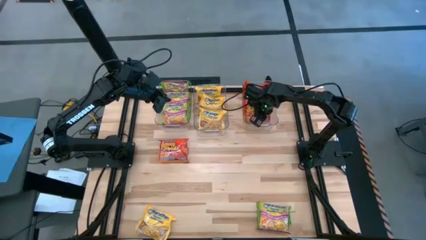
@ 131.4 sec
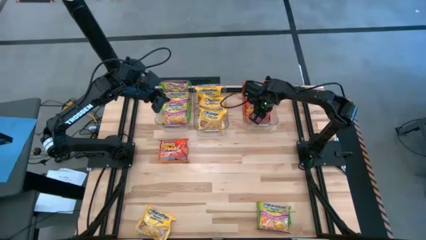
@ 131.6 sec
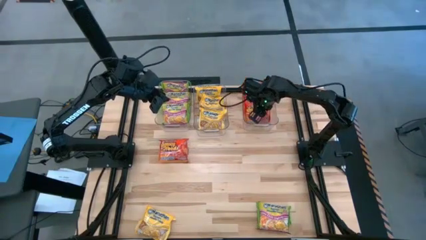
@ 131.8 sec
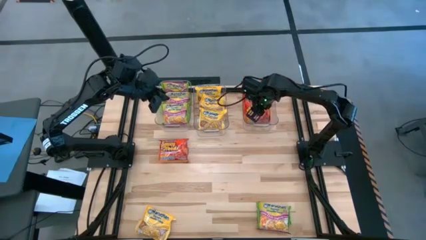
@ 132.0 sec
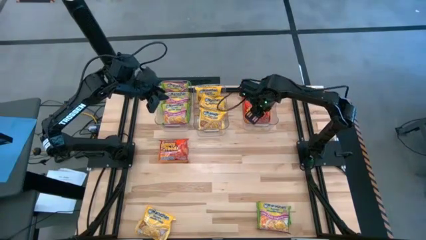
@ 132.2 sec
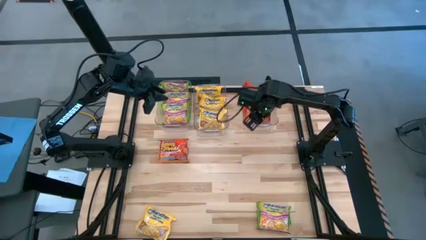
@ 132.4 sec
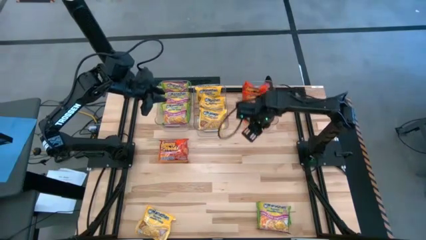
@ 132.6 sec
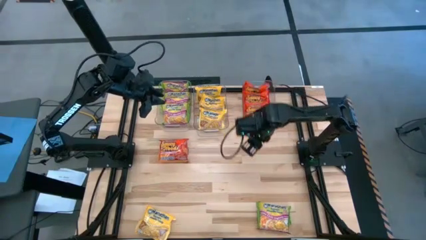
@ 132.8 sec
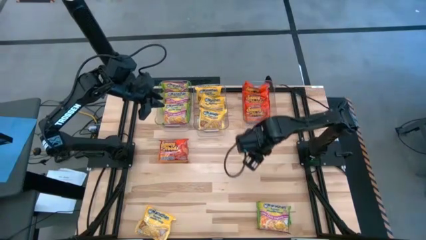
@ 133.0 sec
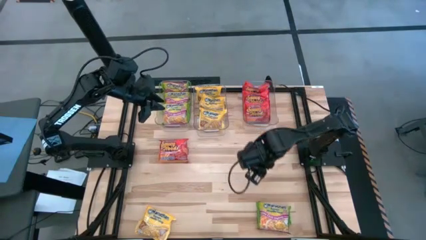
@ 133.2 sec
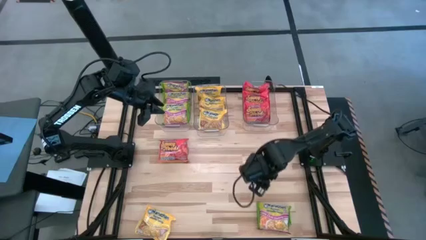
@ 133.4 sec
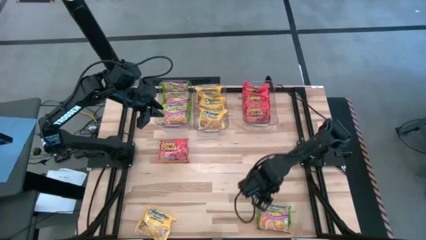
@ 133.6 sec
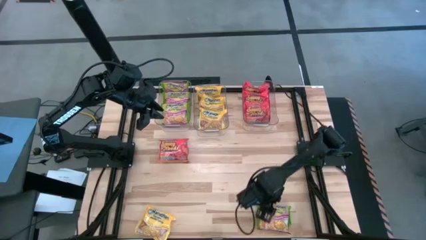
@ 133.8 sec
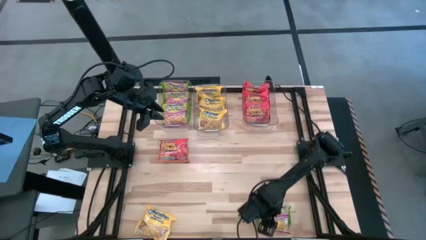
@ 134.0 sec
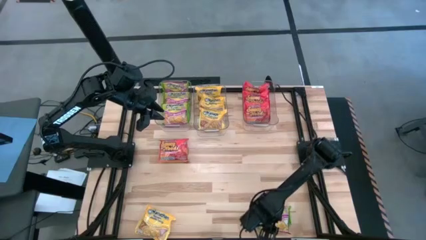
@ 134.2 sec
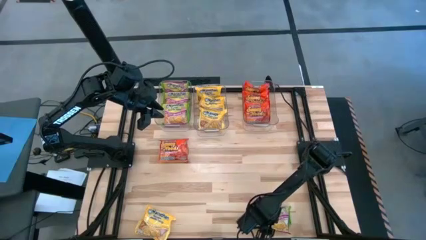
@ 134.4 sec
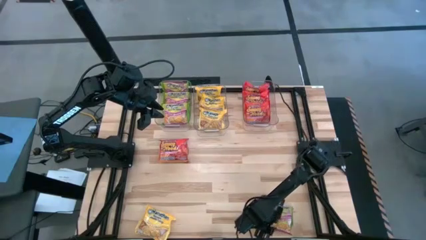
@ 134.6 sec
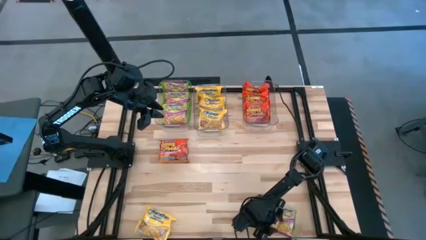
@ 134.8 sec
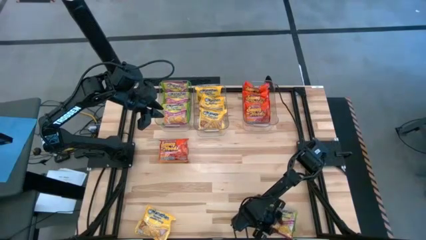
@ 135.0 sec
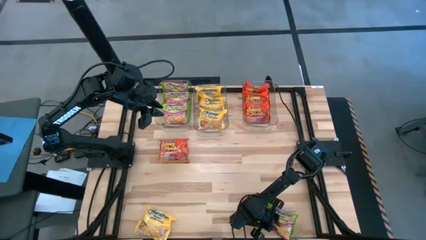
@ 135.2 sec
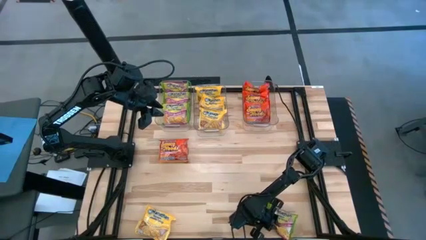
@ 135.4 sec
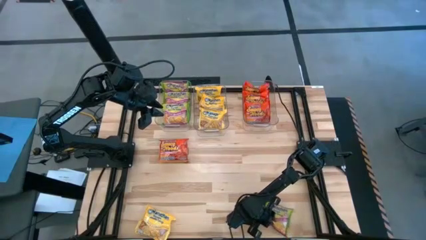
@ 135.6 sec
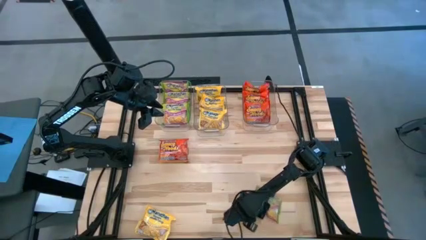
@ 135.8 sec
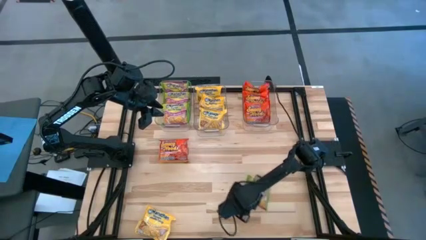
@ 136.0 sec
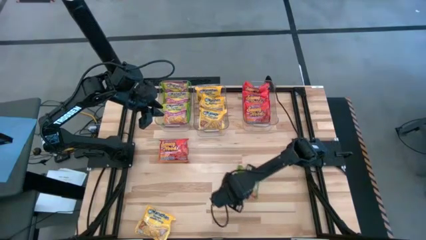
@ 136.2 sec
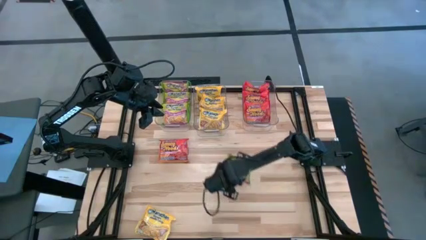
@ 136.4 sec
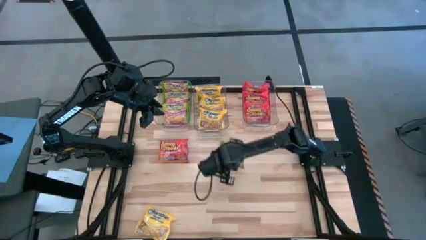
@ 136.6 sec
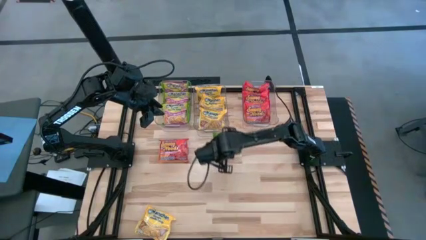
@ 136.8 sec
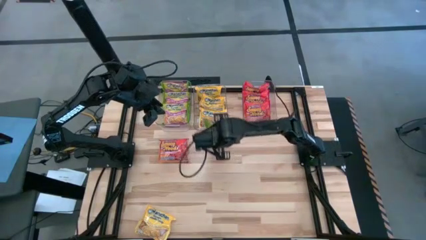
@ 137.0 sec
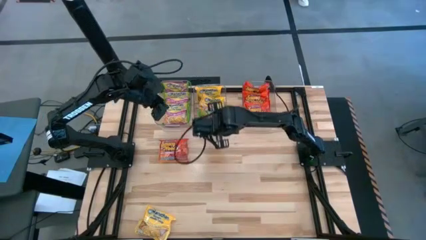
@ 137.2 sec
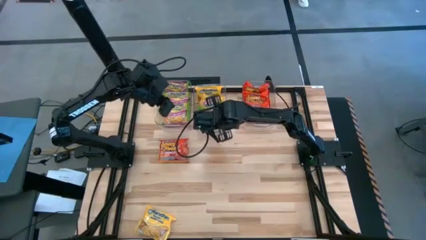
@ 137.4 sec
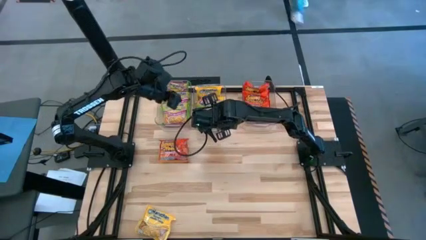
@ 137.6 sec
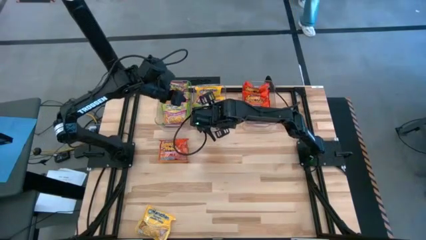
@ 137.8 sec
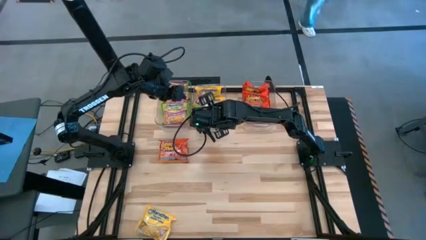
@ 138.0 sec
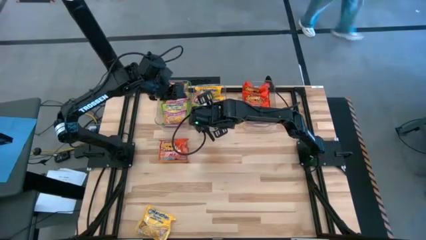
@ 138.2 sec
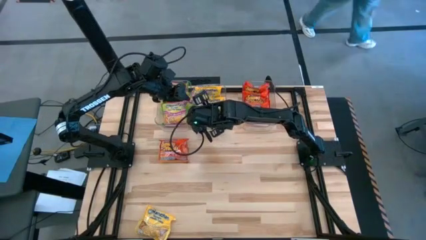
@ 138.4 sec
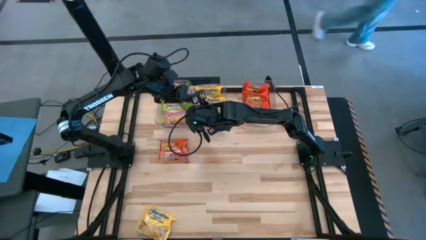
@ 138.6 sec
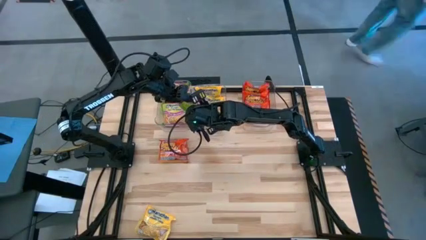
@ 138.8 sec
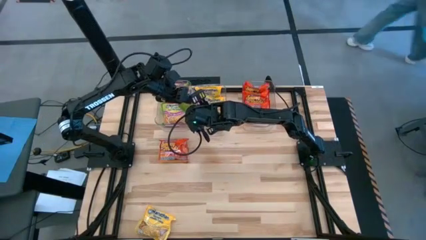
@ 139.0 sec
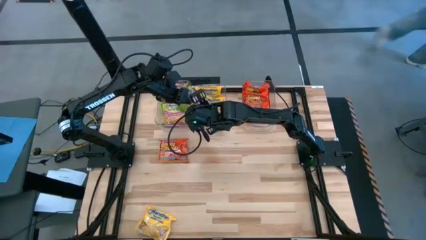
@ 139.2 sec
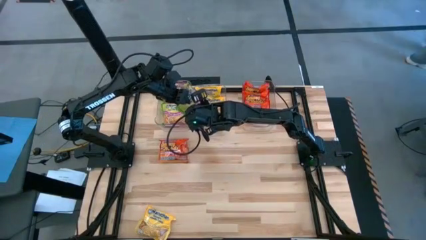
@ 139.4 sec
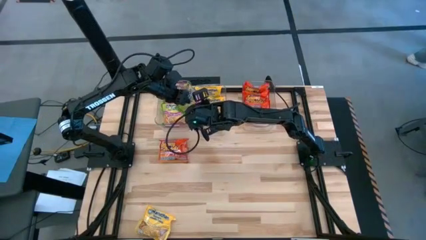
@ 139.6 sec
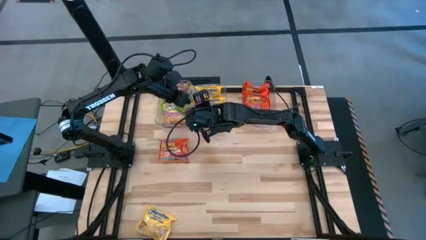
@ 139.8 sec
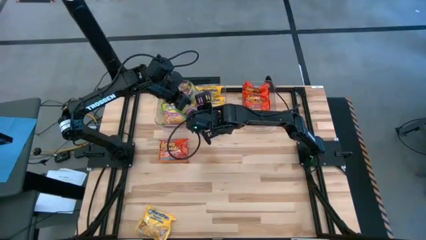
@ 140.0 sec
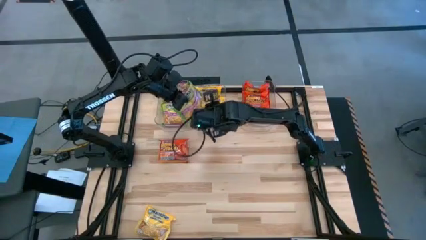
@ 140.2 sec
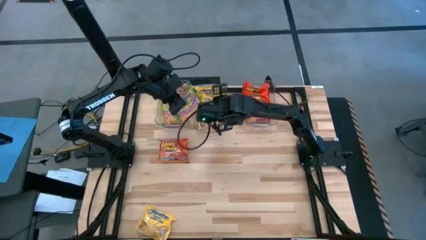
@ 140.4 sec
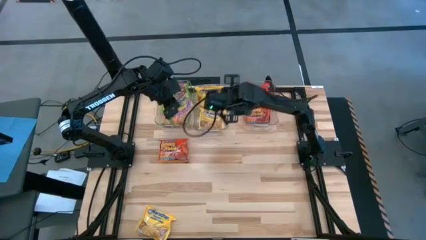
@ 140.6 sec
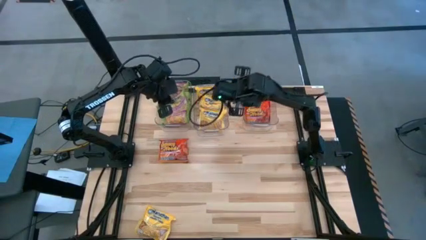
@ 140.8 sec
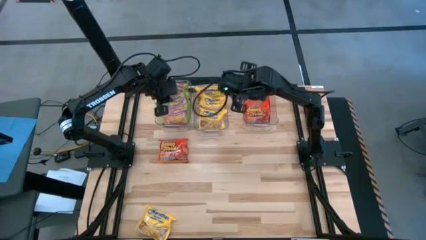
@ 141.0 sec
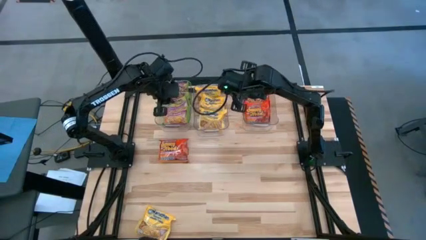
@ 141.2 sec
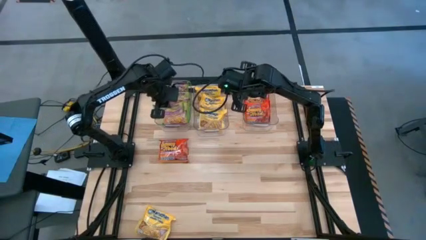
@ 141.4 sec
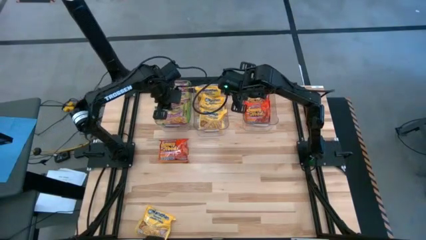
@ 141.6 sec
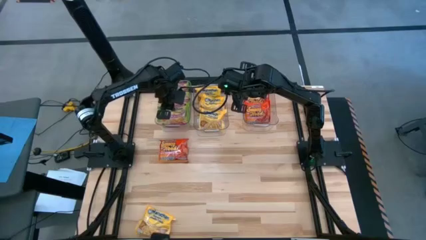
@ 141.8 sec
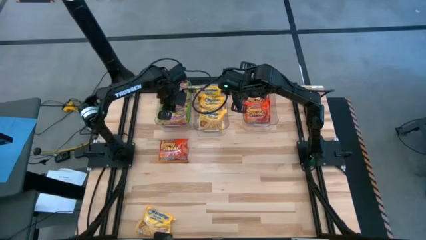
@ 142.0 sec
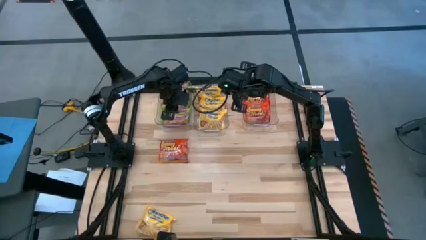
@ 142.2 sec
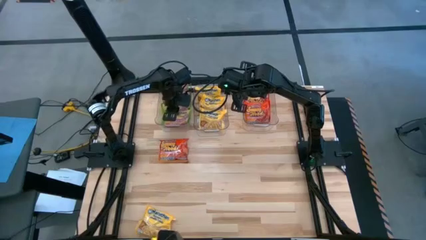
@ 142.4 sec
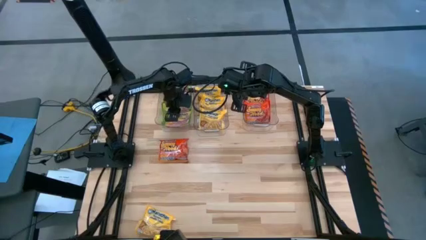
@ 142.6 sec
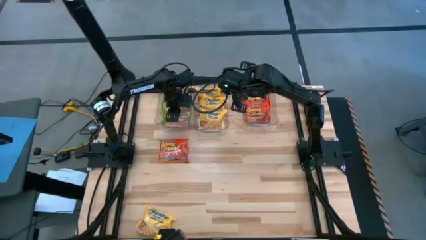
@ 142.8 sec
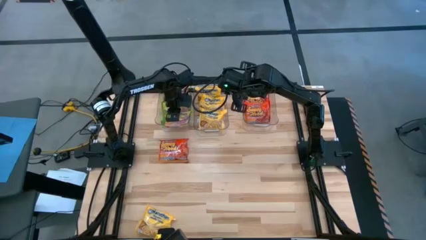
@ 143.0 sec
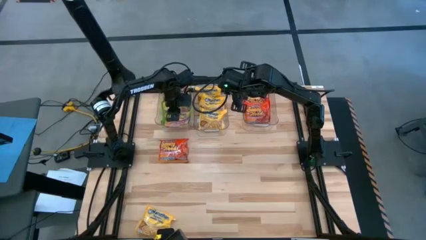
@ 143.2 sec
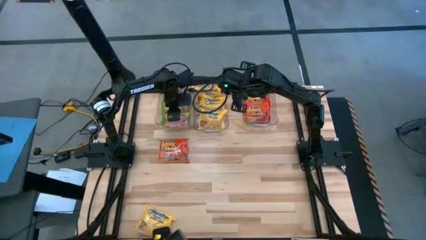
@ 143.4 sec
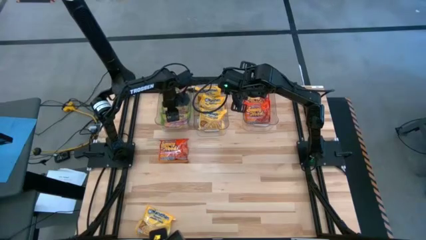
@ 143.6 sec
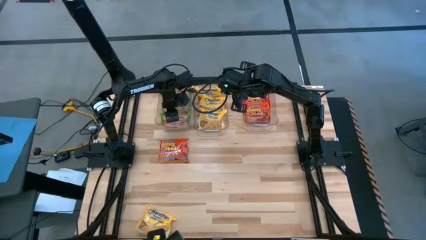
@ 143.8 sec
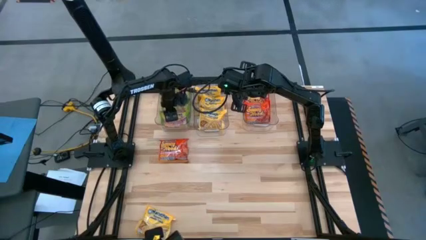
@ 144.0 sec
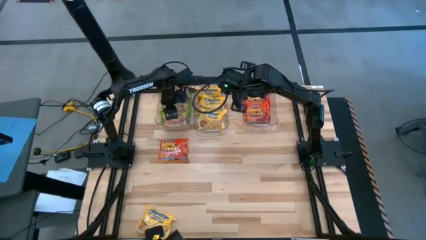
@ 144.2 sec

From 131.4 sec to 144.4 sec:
Task: Sort Maruchan noodles
Put the green noodle pack into the left transparent bin
